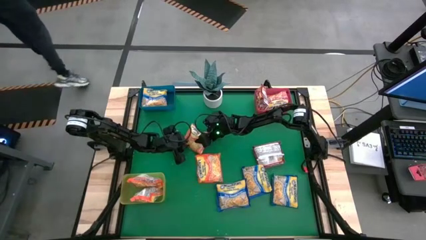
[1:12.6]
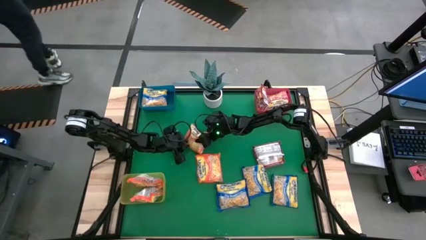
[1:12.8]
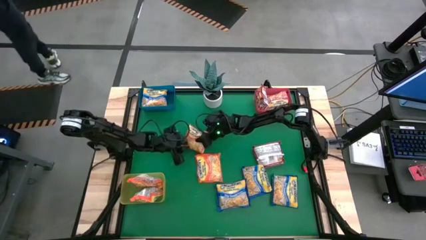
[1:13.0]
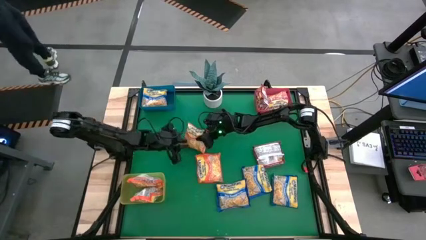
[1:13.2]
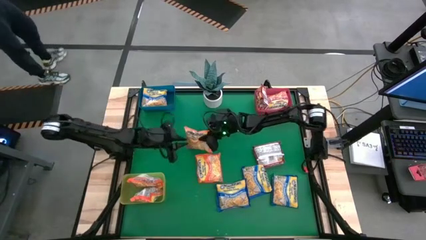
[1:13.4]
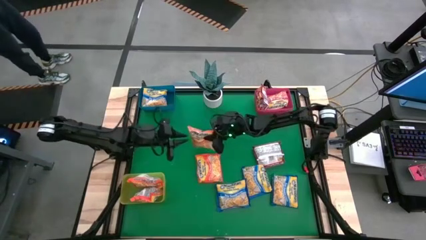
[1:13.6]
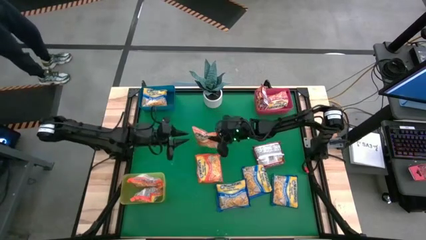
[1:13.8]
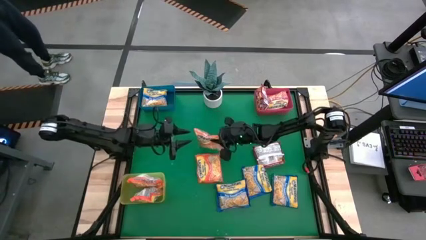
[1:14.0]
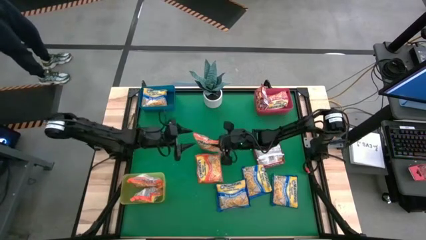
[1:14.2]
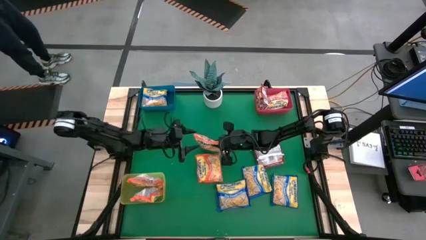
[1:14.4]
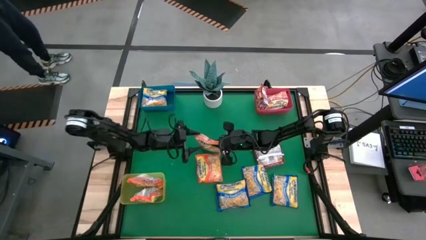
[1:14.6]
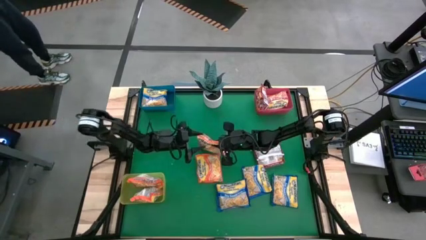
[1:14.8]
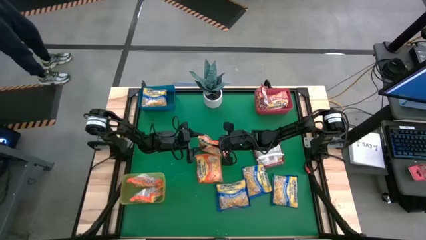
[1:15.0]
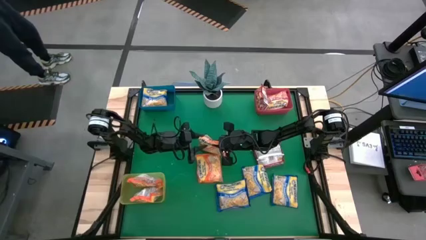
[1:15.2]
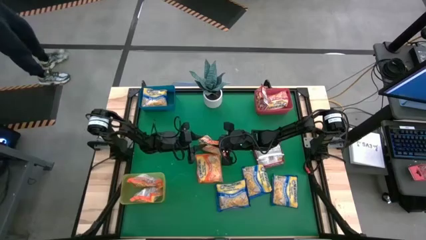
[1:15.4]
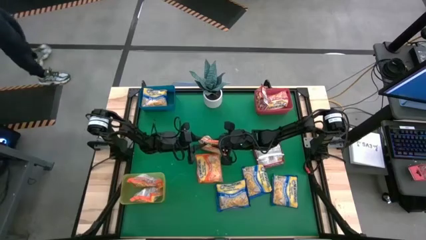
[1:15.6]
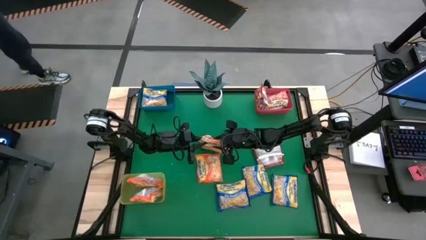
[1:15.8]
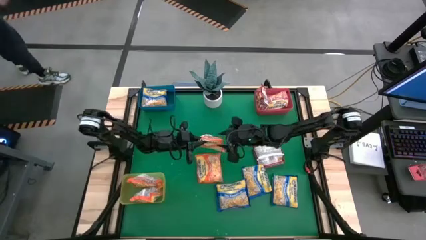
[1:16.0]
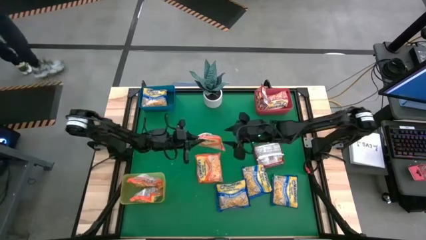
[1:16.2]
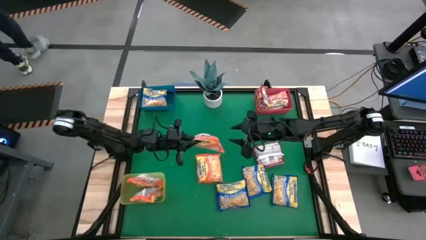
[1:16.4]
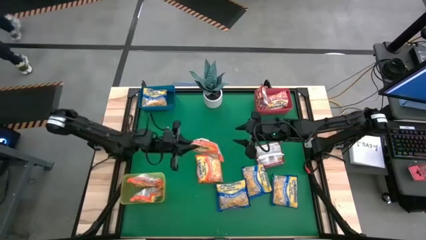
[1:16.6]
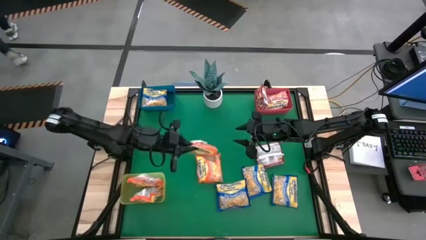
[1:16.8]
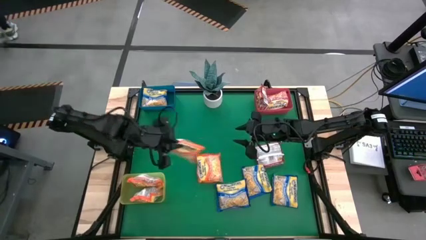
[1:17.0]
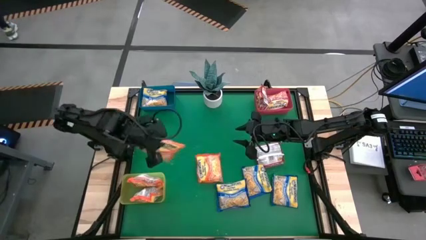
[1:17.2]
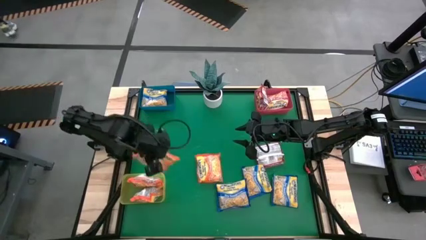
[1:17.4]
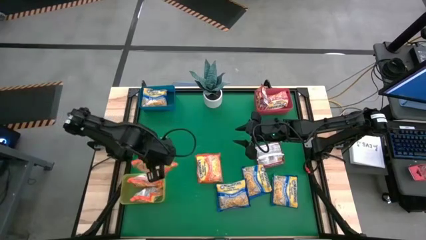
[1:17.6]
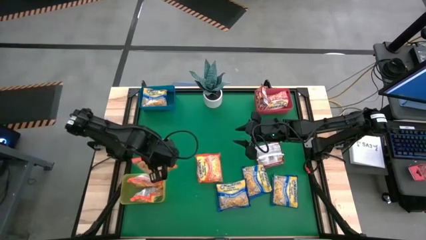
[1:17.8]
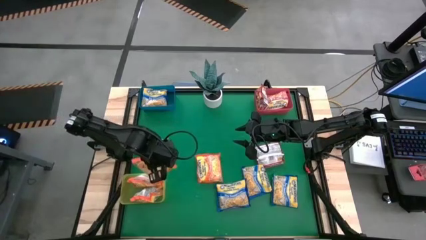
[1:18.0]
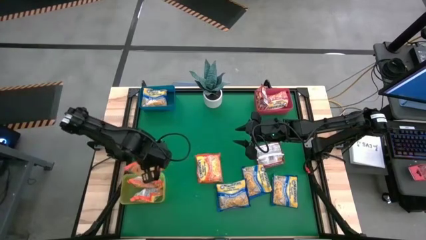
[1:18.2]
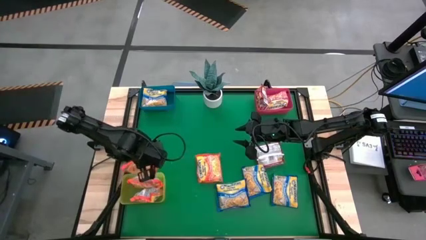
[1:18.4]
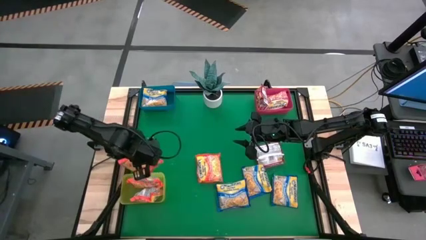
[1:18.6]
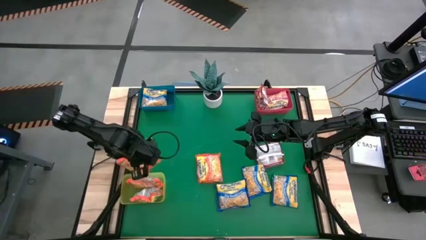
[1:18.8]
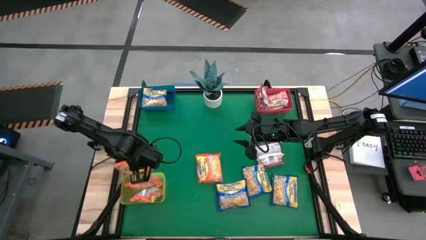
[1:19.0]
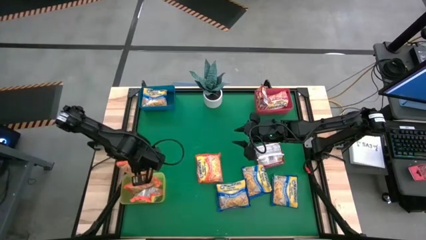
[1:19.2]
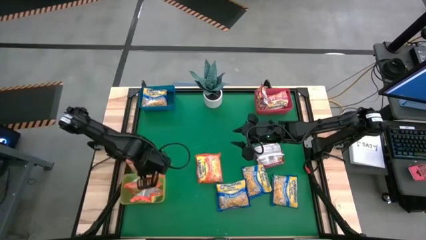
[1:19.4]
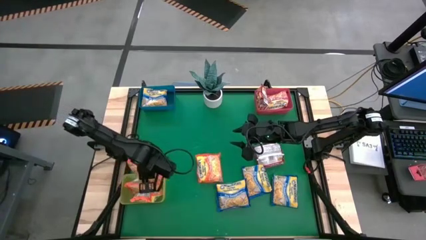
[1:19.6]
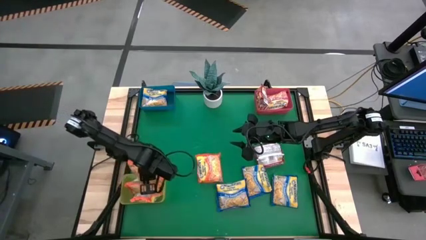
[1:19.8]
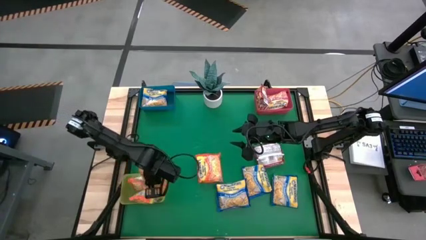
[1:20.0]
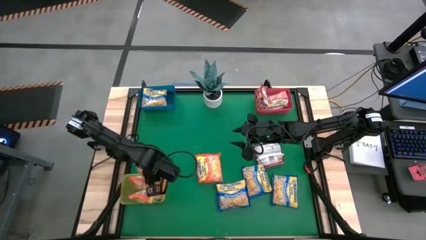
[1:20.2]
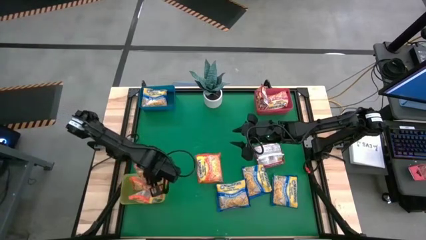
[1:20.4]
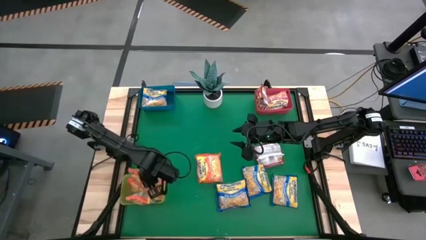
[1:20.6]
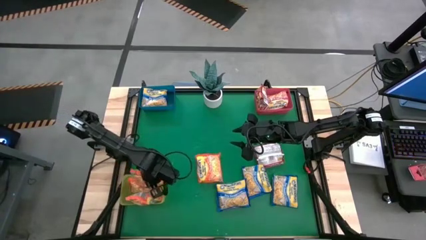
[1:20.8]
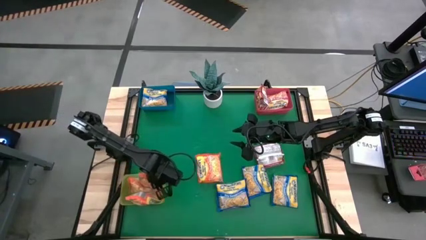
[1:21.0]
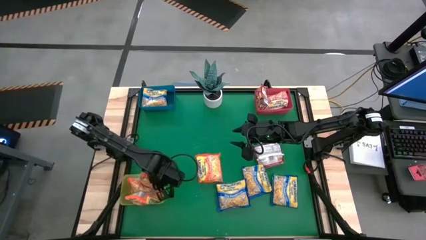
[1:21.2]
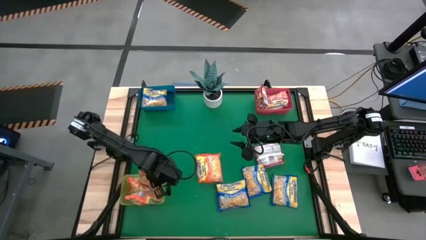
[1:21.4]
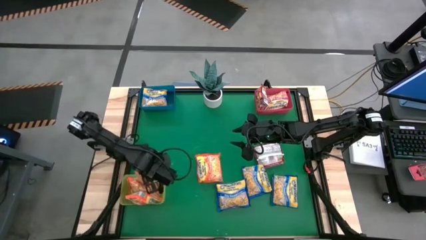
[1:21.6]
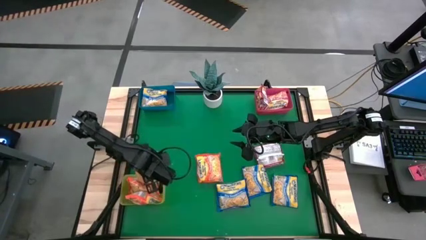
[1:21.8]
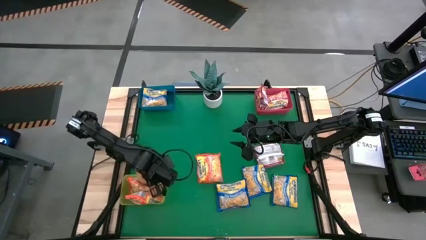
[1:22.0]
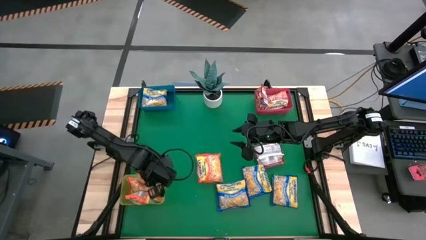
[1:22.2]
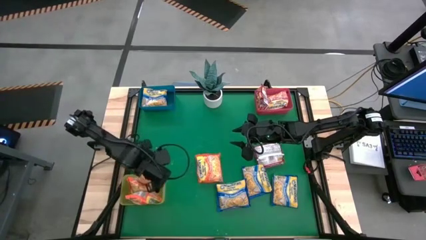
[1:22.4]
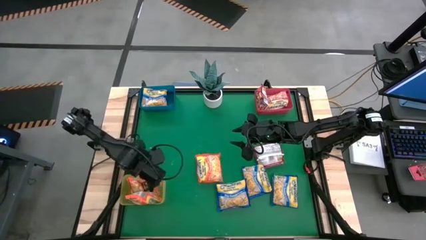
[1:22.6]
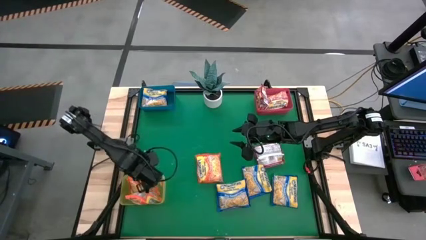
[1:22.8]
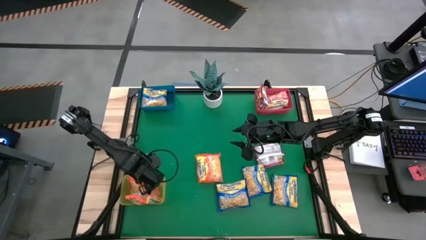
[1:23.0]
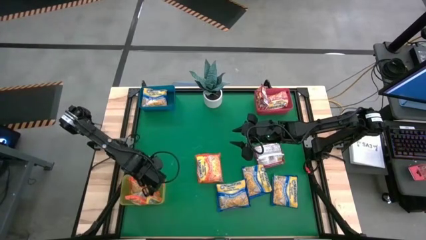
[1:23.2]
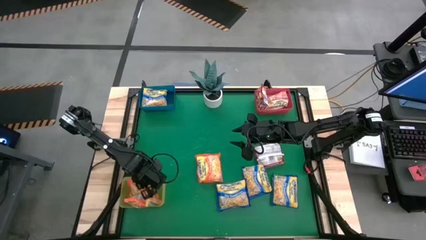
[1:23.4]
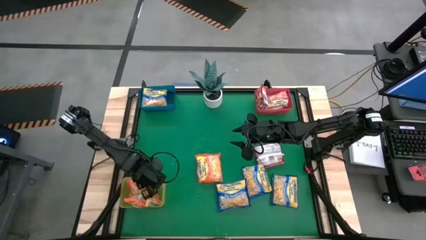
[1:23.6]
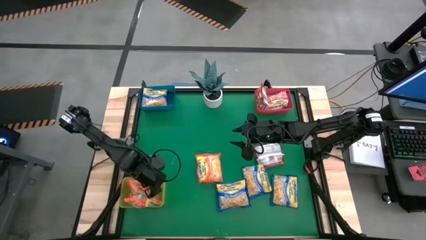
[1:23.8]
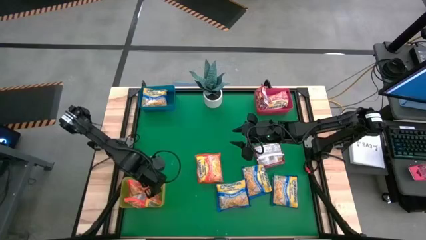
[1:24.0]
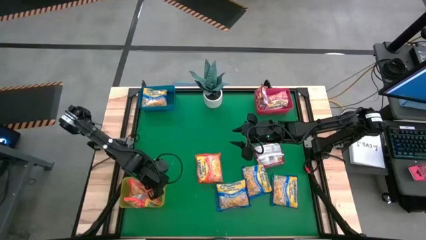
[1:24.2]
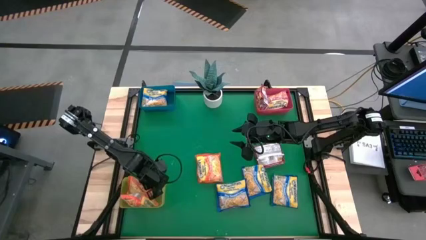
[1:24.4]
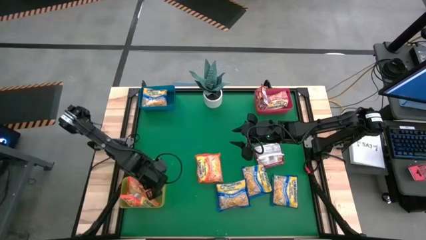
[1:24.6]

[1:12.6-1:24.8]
Task: Sort Maruchan noodles
Put the orange noodle pack into the yellow bin
